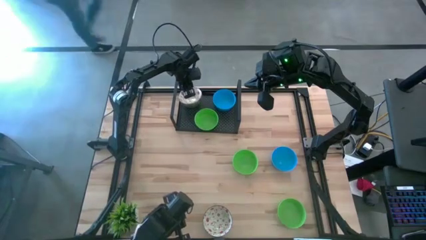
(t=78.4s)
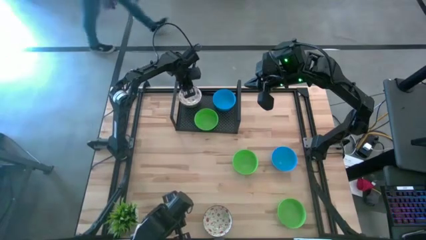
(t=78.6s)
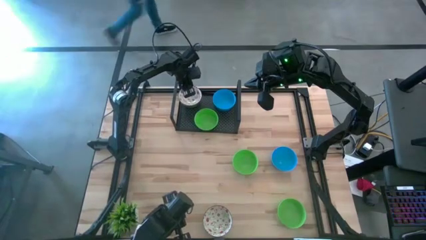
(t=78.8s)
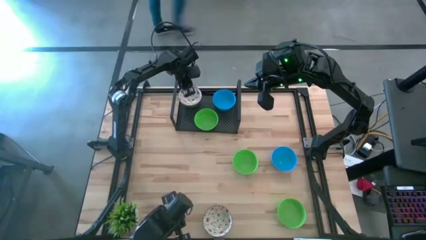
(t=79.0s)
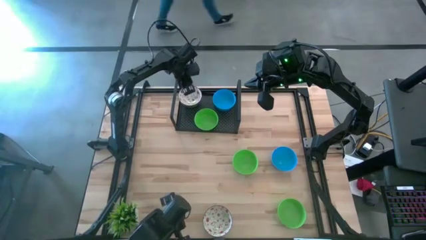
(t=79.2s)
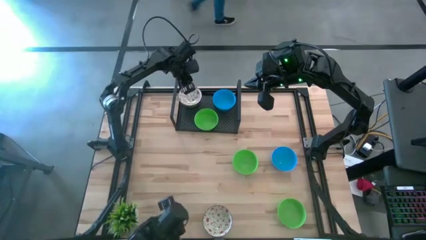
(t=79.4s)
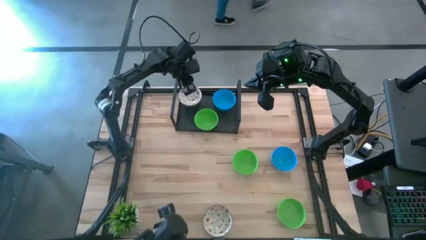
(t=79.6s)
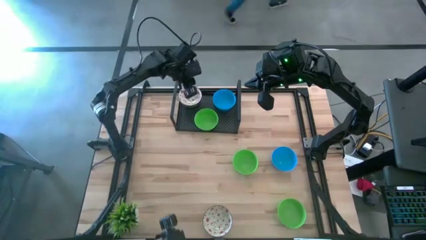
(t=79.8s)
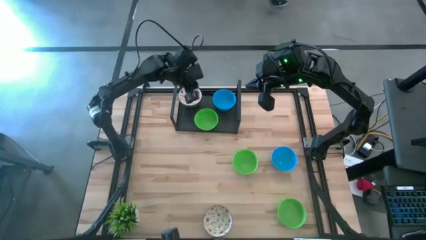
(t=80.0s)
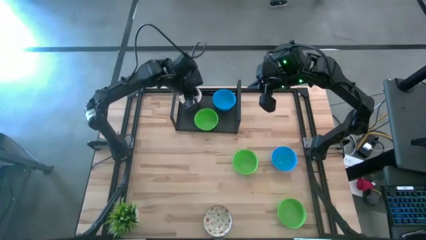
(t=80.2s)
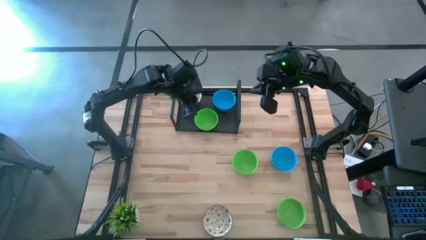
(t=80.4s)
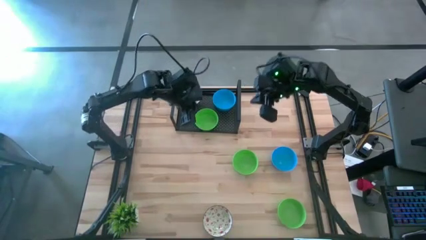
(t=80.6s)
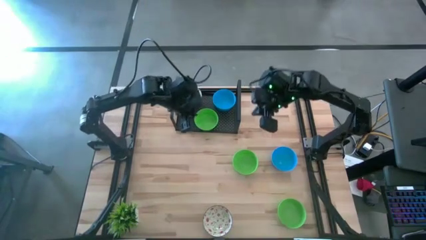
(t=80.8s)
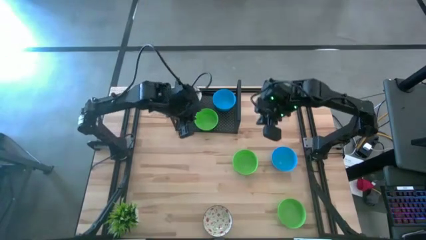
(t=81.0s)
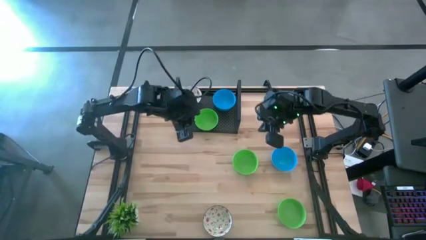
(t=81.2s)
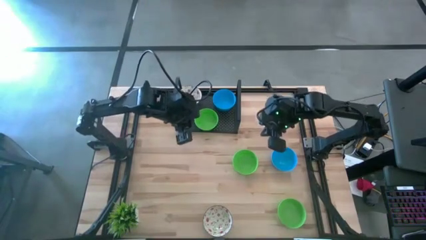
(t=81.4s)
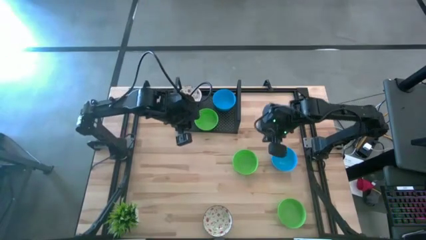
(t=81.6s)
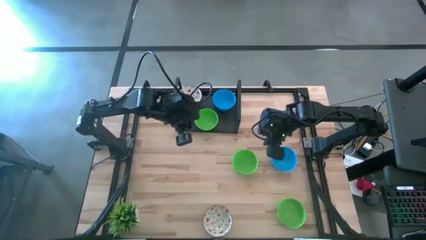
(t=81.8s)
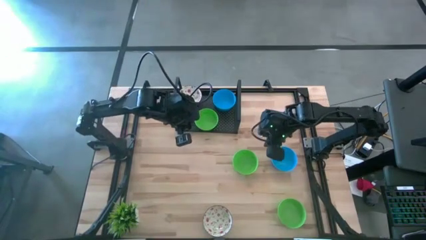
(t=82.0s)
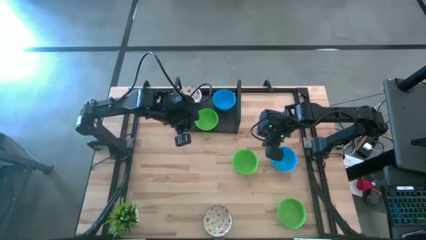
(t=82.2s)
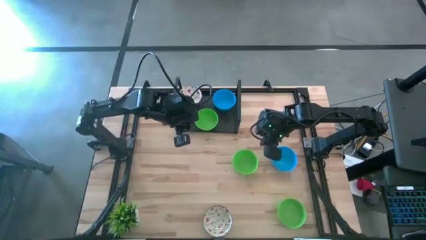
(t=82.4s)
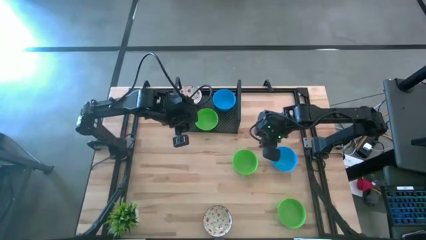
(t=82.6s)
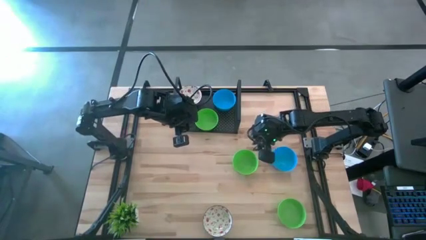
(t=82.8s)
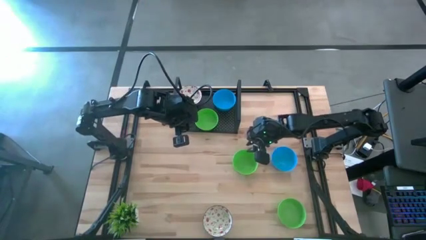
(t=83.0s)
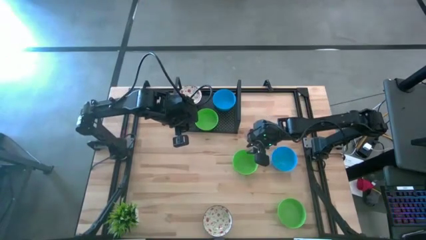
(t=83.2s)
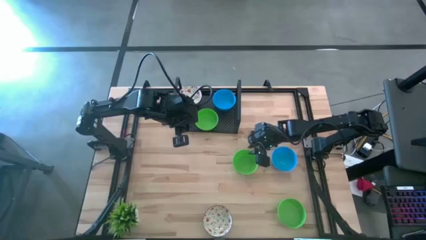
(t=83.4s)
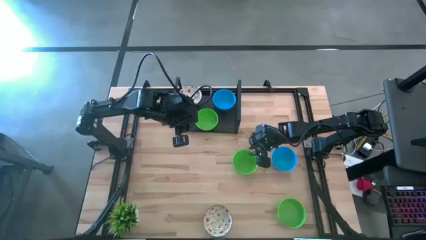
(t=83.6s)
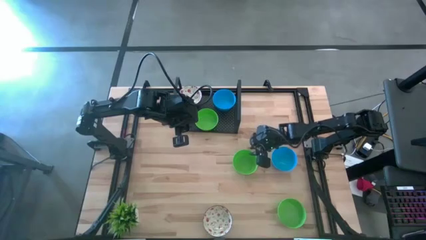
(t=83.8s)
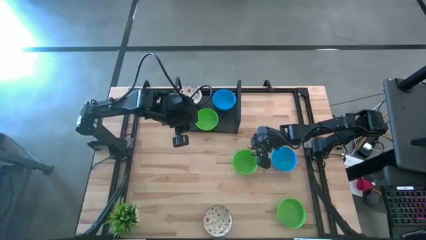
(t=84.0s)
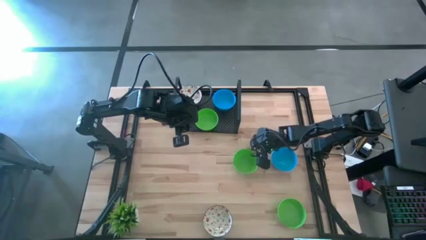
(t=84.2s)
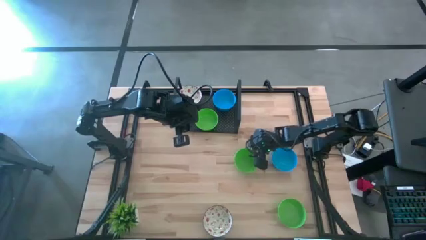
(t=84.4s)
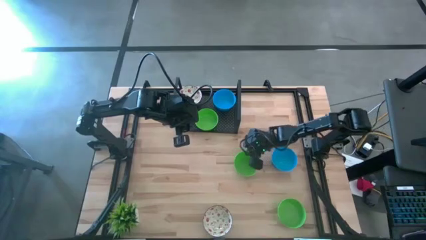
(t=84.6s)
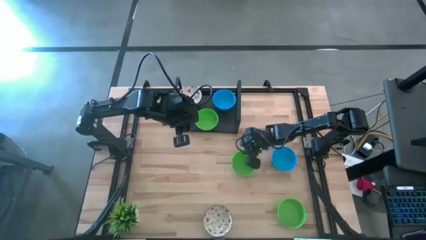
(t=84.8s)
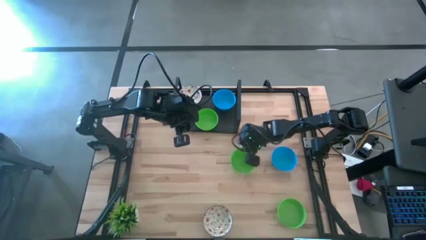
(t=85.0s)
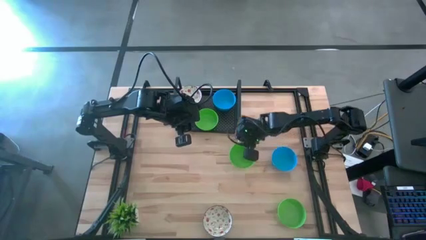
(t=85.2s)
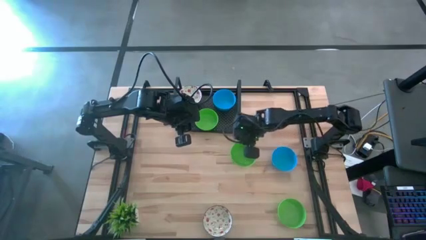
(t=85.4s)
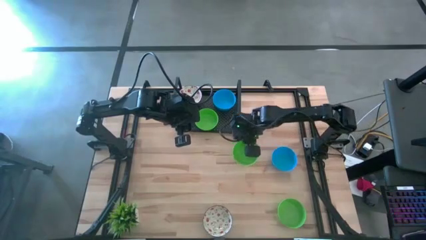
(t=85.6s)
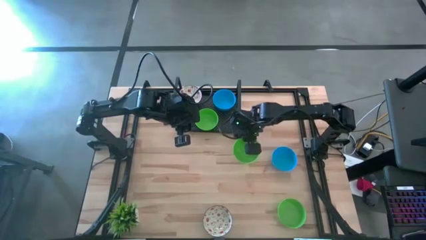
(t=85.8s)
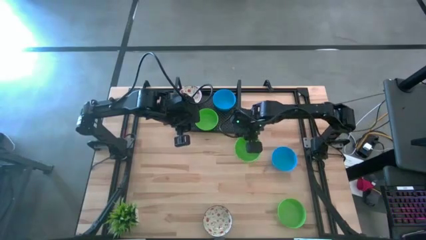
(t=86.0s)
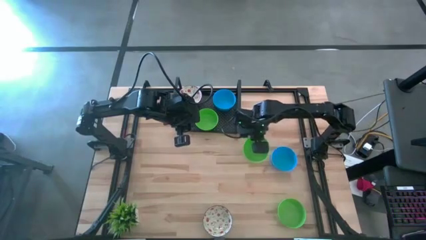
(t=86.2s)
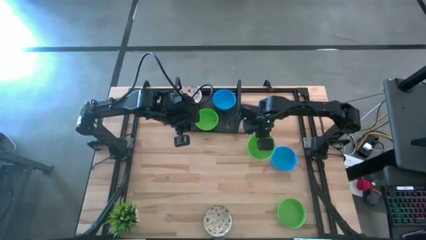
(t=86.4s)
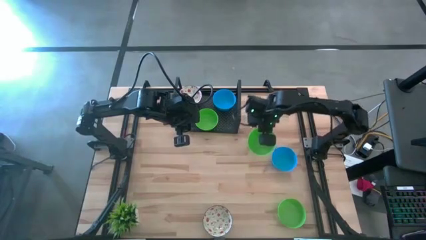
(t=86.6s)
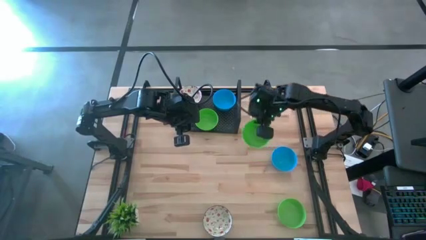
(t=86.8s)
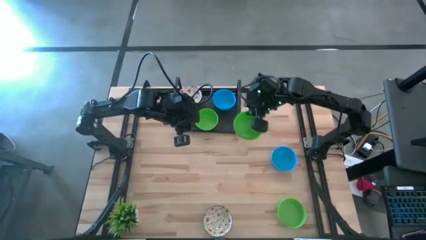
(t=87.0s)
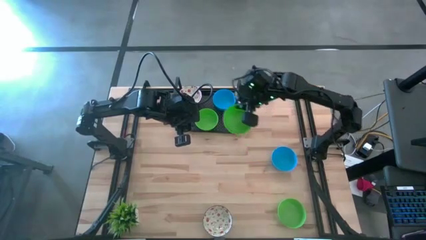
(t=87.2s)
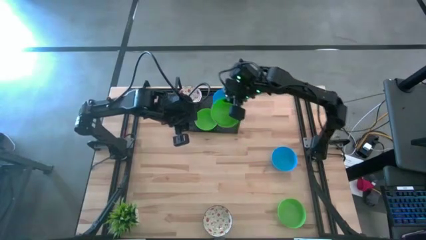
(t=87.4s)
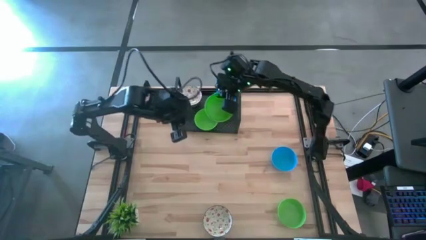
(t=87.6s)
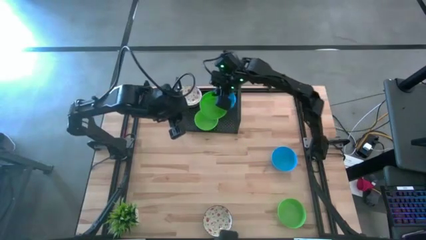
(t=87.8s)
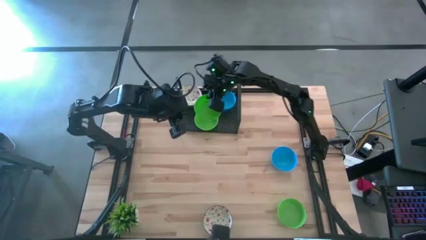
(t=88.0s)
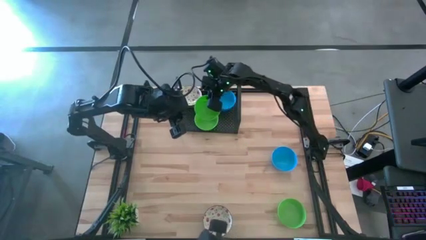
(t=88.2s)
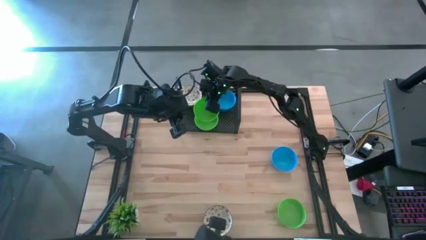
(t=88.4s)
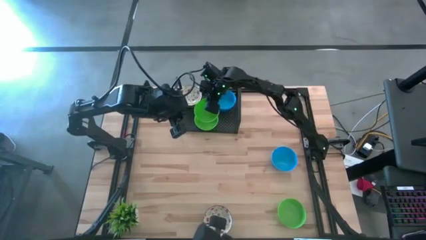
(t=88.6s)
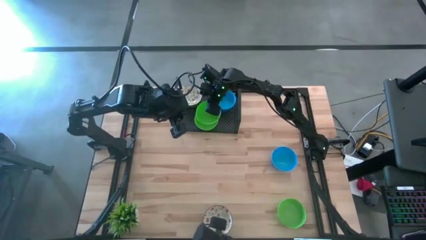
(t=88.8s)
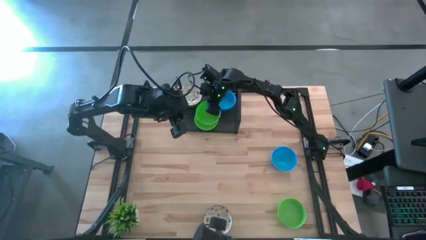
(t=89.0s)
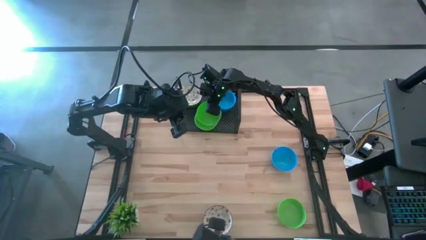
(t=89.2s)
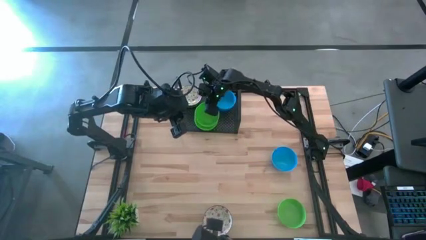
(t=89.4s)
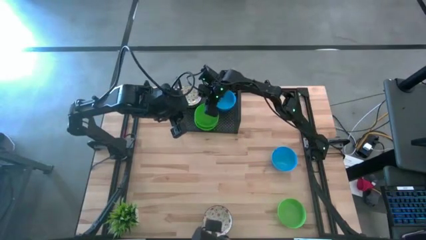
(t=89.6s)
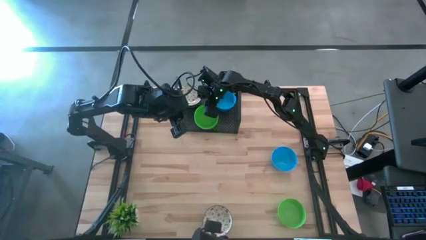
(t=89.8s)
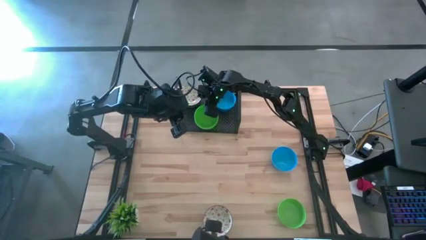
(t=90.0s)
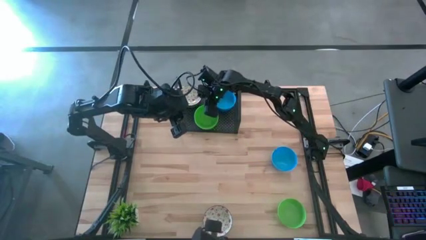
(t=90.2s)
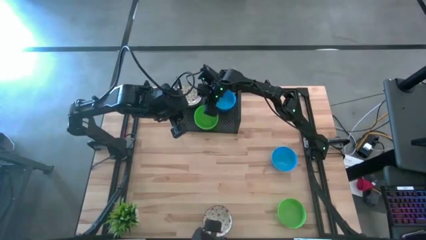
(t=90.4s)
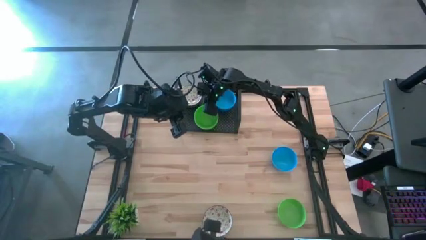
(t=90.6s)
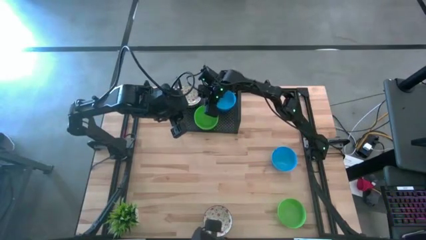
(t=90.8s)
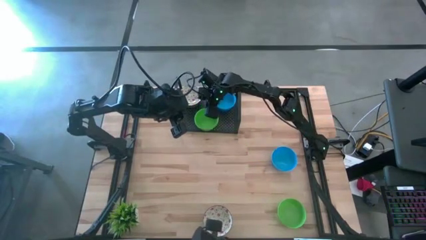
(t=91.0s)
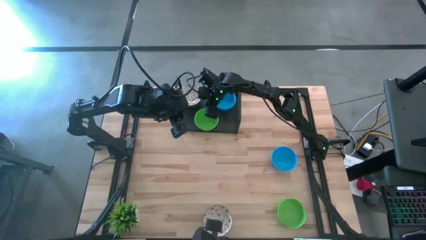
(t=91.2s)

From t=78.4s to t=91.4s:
Task: Pick & Place Mini bowls
Stack the top green bowl on top of the green bowl on the shelf

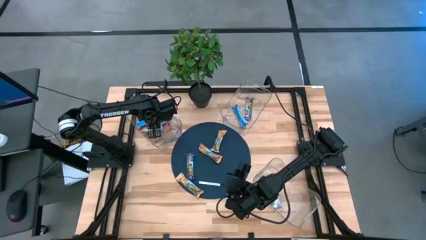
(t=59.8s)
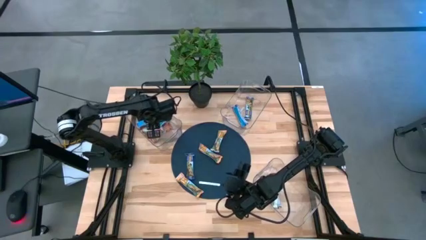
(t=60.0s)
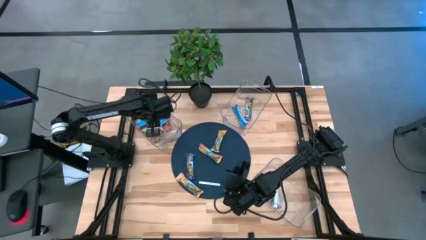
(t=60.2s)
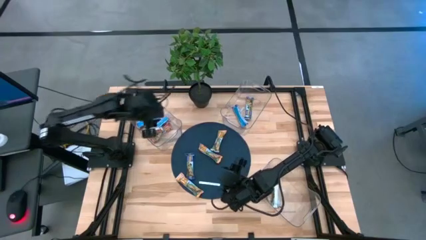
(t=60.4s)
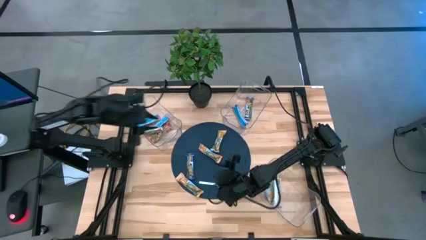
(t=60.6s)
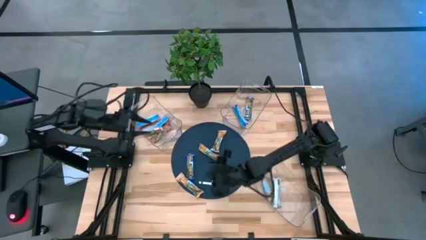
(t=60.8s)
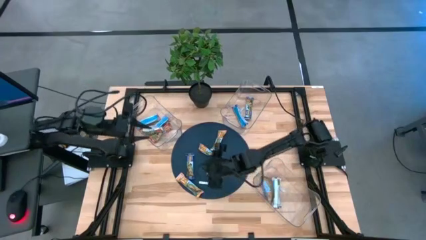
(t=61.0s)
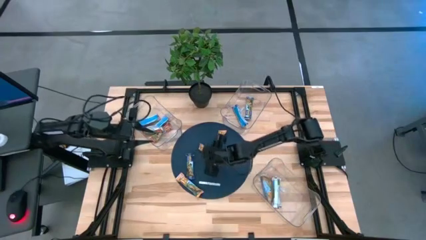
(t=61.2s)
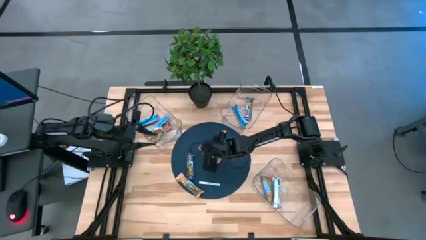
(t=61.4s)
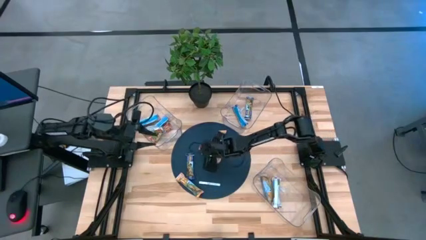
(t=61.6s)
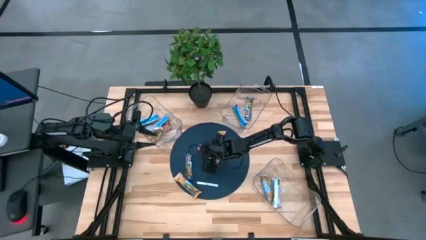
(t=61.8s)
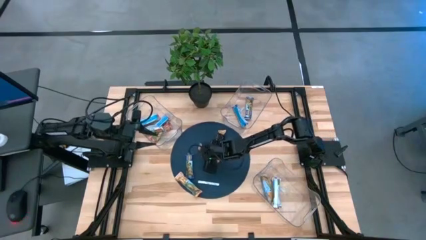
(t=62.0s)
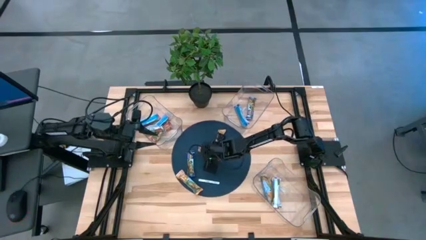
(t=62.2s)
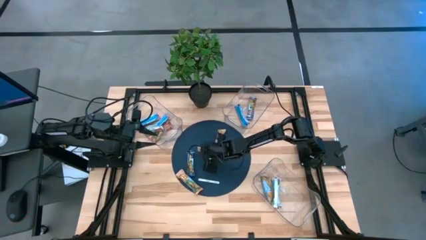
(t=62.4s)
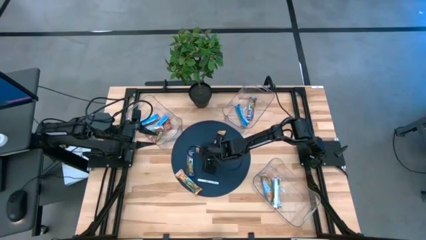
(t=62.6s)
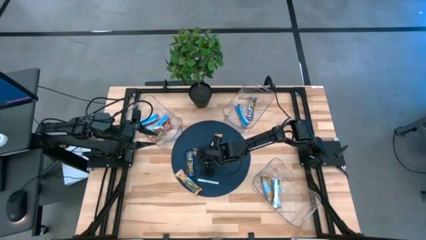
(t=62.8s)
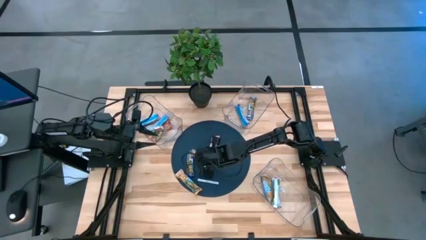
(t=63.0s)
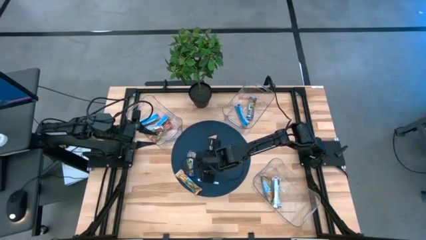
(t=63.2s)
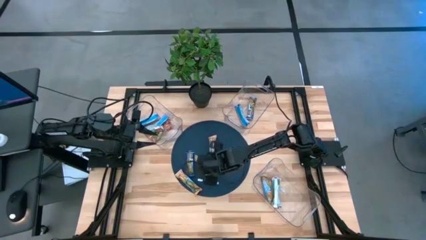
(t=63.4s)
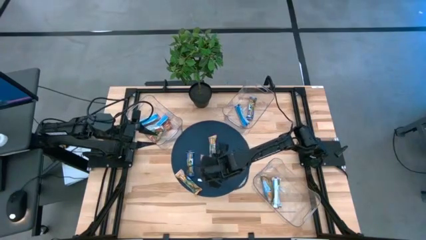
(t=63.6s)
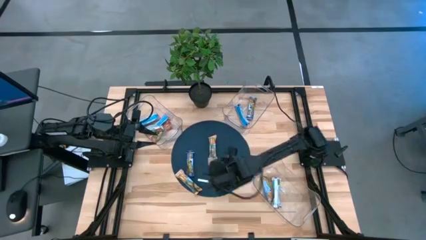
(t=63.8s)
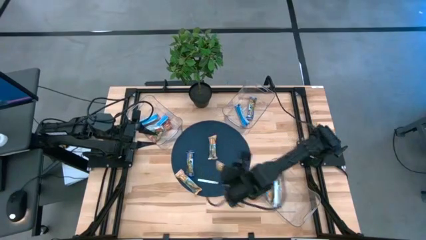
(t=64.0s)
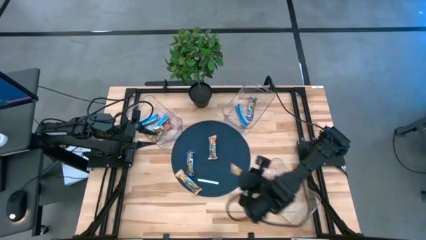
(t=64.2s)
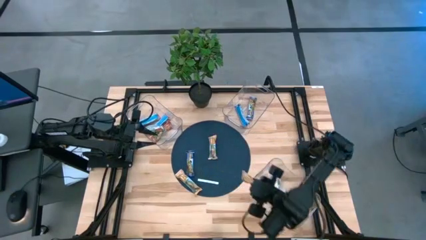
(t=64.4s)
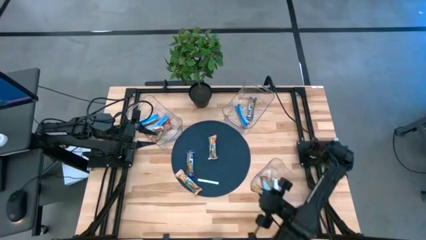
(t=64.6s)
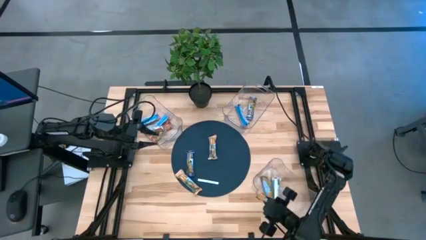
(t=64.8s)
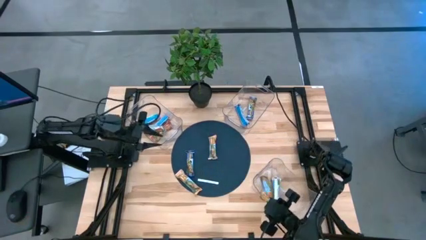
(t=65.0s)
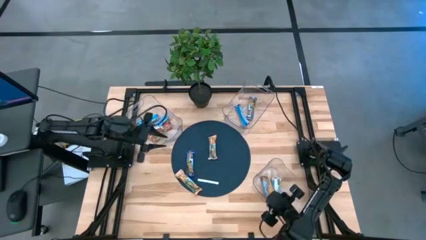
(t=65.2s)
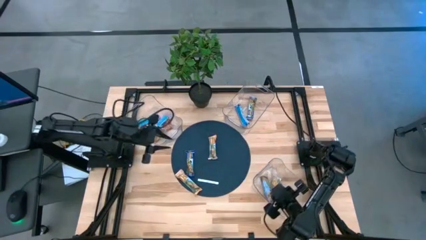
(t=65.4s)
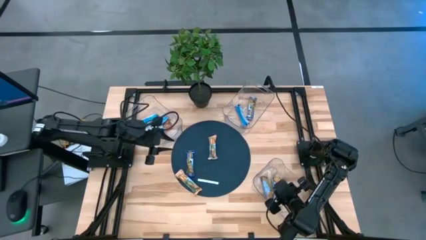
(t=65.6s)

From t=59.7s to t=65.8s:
Task: Pick and place Granola Bars by type
Put the yellow granola bar into the bottom transparent bin
